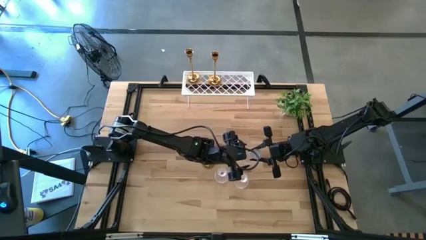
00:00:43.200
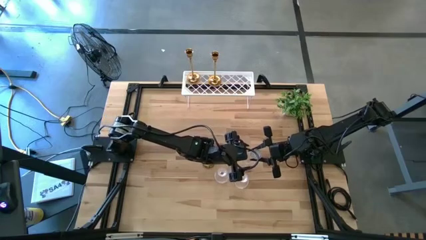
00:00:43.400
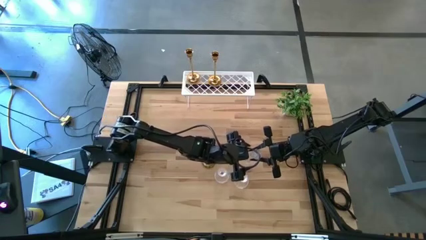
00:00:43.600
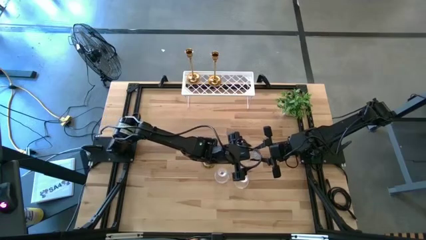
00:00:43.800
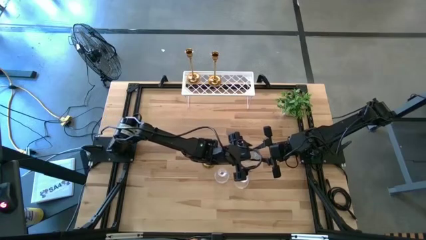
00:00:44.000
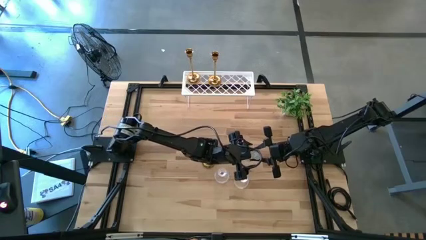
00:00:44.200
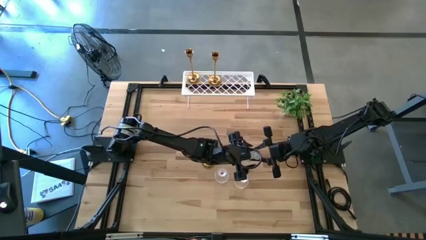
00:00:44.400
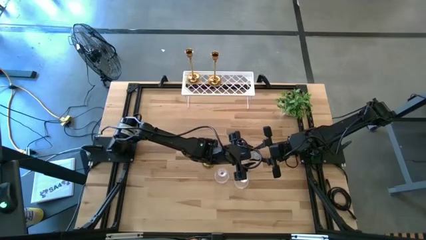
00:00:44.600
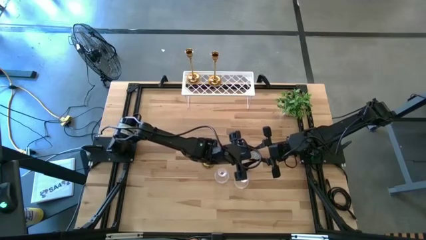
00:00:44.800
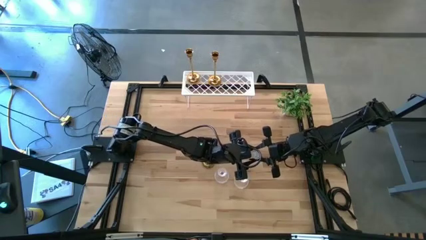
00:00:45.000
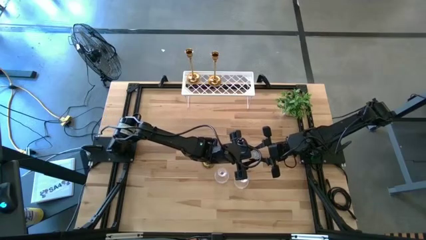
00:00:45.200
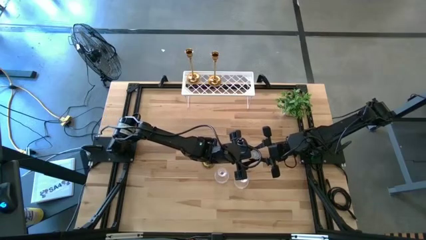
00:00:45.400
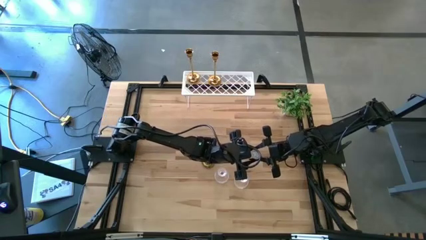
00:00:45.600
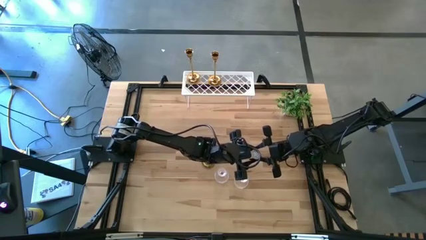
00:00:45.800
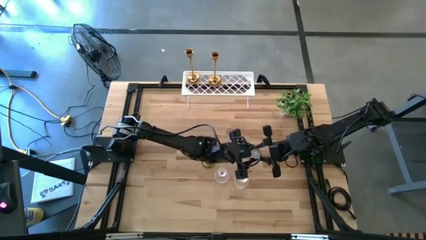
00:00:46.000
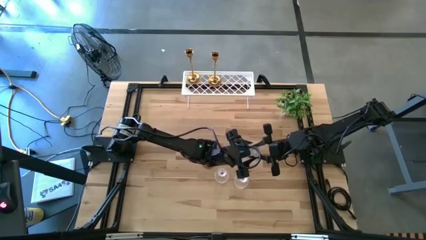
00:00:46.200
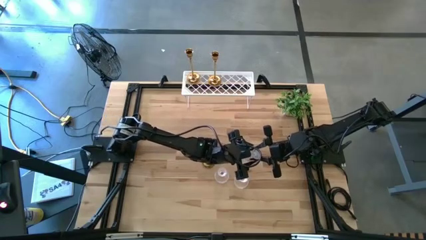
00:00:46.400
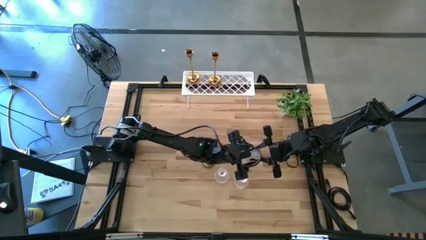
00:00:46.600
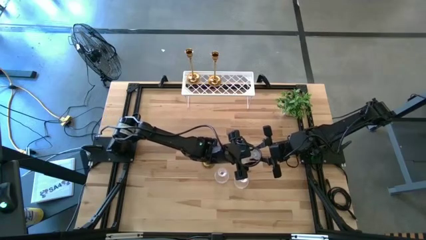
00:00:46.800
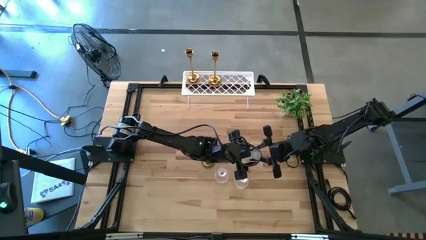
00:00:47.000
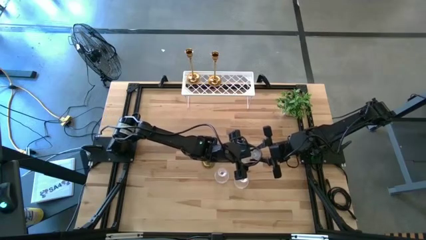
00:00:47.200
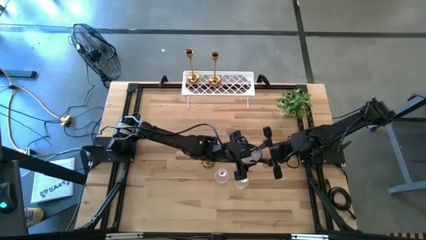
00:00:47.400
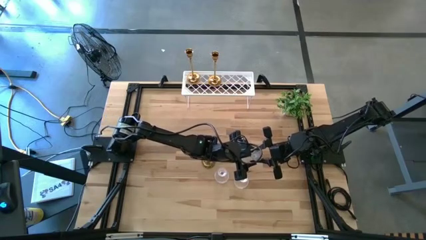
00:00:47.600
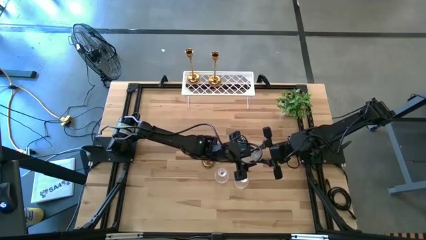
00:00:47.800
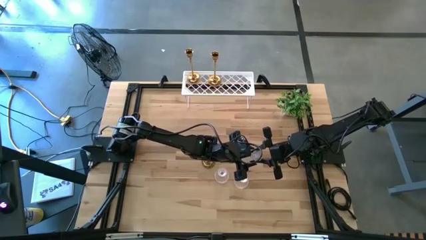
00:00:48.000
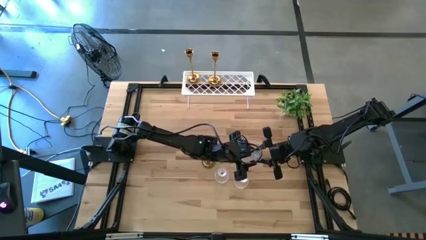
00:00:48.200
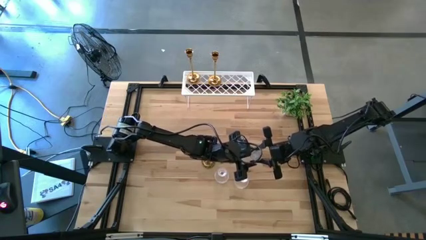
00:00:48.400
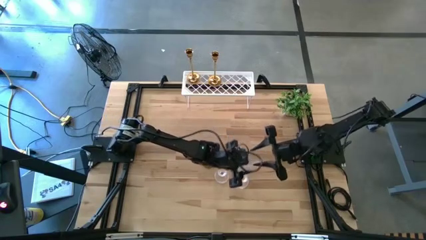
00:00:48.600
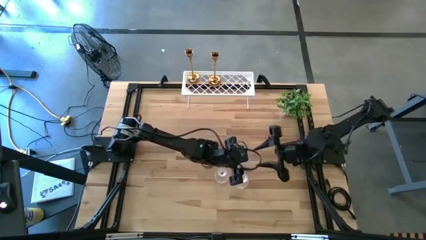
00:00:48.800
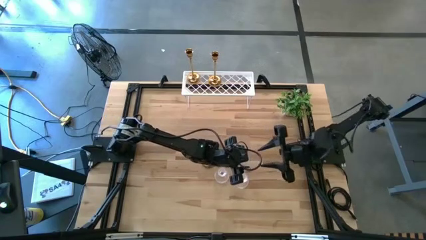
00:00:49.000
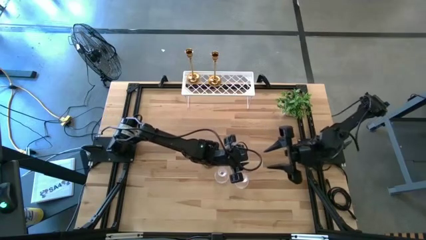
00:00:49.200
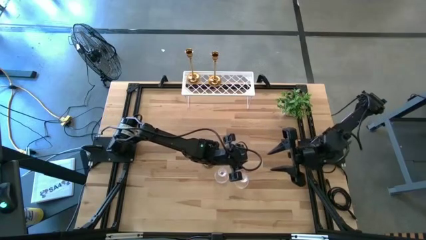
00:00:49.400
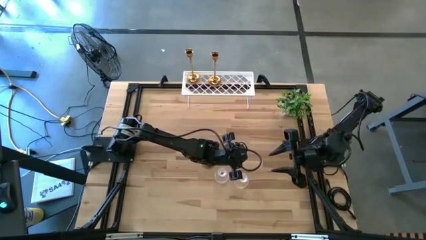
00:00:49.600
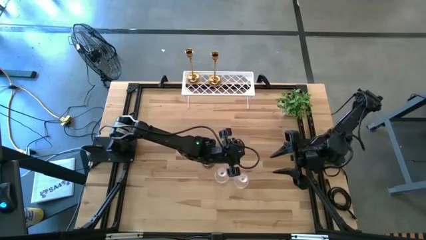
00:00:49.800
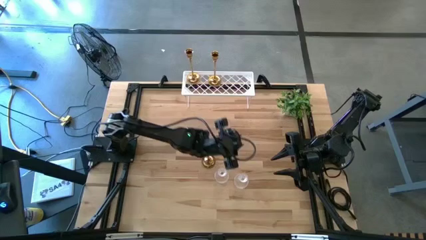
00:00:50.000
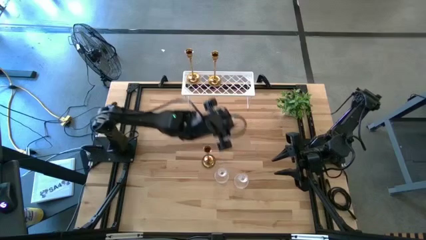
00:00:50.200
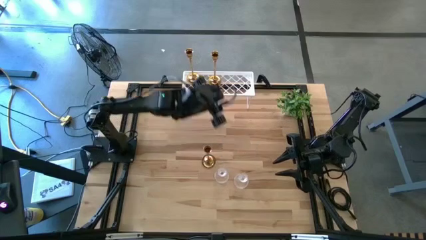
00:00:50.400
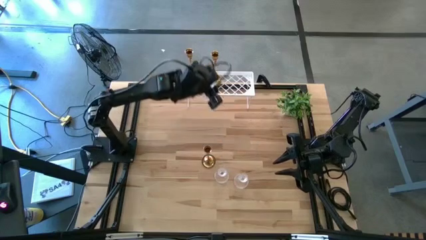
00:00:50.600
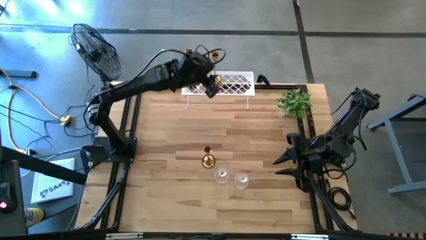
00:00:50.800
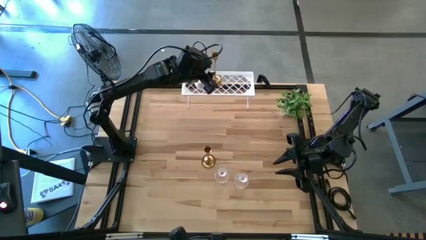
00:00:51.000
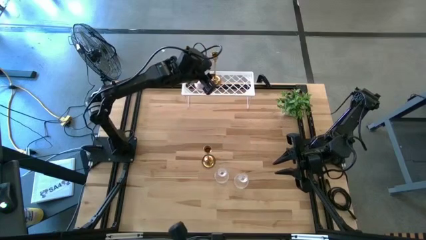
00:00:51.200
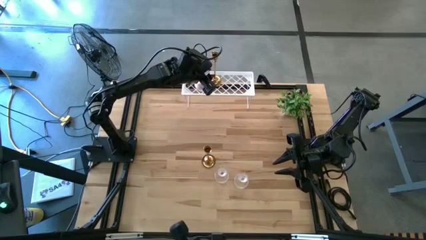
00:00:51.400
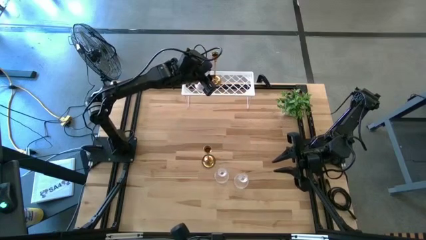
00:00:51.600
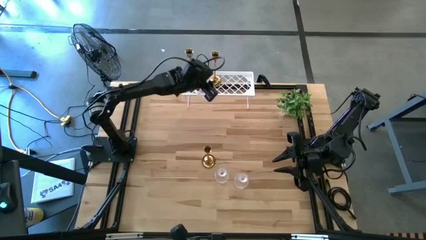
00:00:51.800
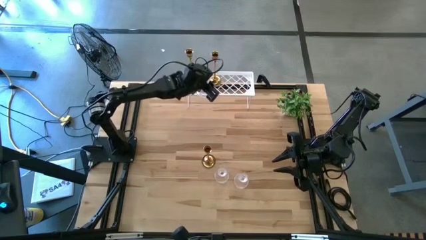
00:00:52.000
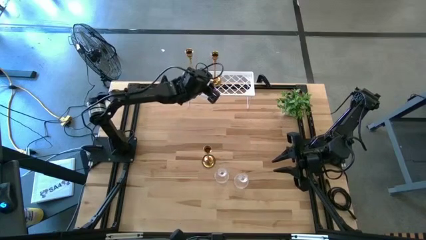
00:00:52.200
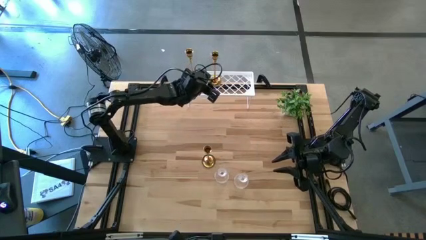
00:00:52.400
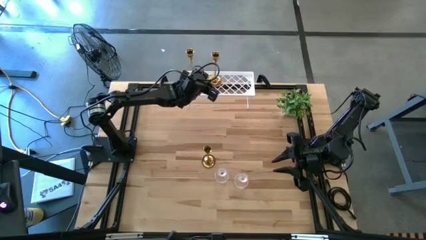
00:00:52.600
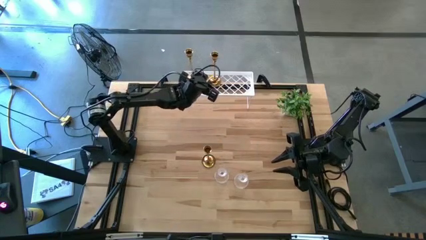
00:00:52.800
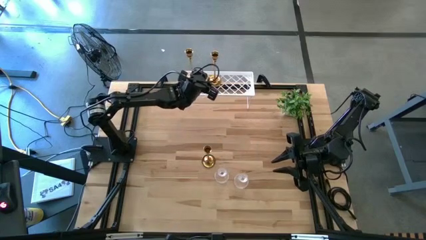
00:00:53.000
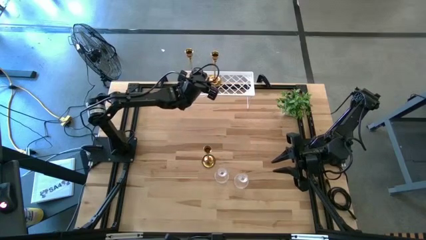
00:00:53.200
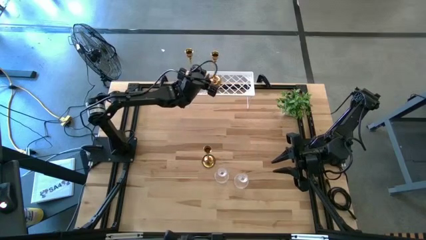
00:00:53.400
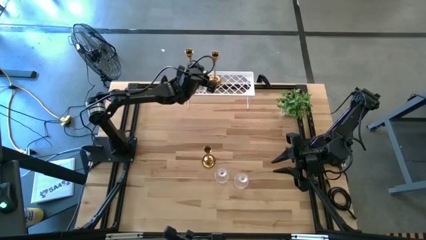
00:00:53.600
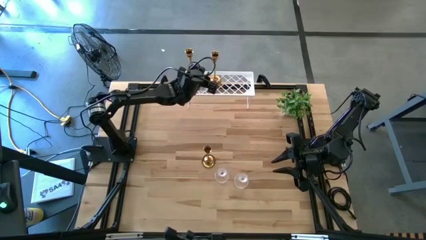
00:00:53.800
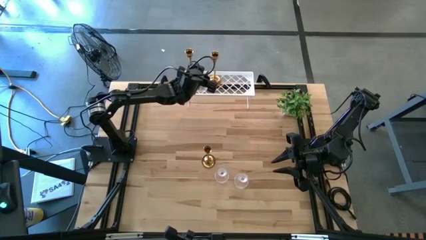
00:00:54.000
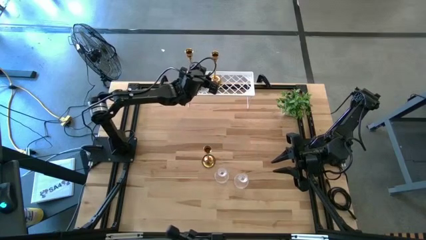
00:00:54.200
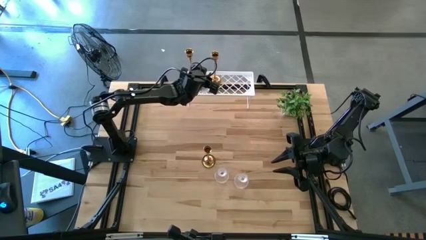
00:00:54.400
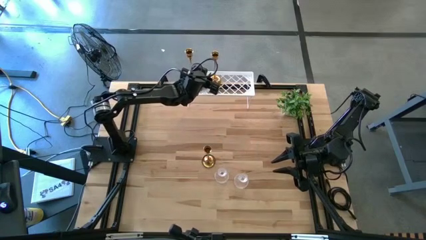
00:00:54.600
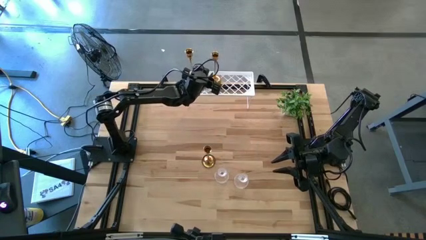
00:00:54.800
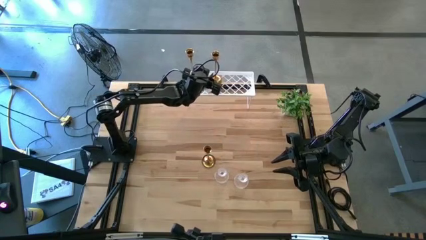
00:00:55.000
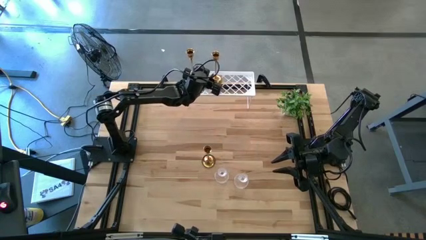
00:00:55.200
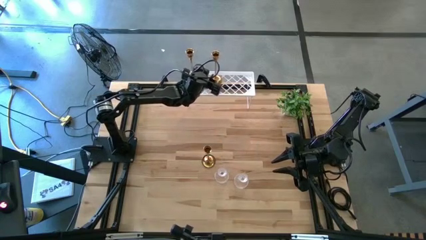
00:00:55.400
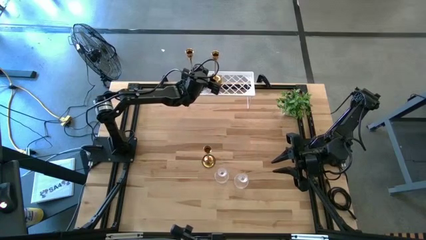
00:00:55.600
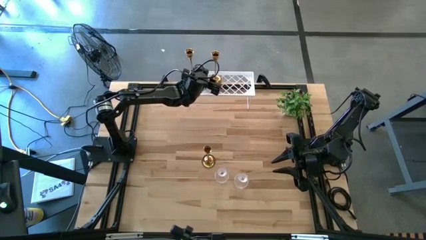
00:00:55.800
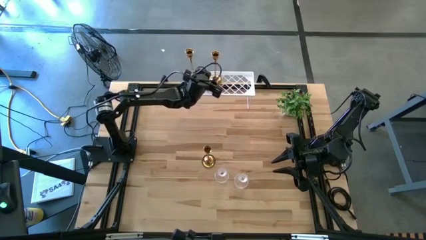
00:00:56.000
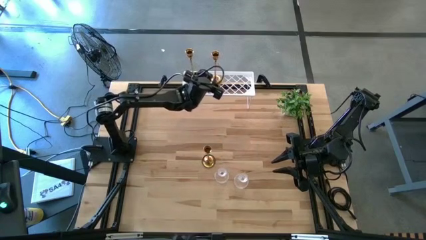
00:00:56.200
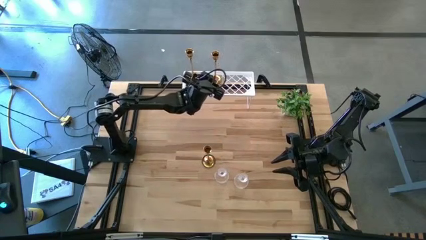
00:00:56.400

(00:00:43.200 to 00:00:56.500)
Task: Pick & Place candle stick holders
Put the top glass candle holder on the shelf
